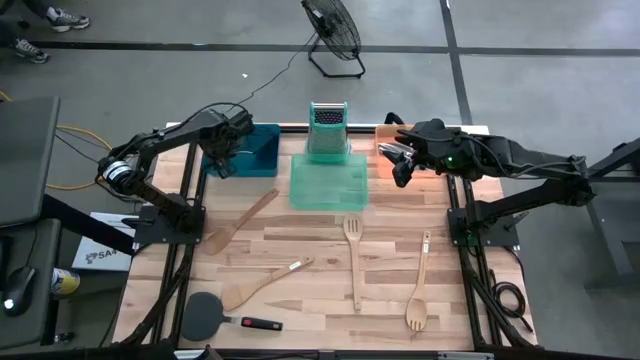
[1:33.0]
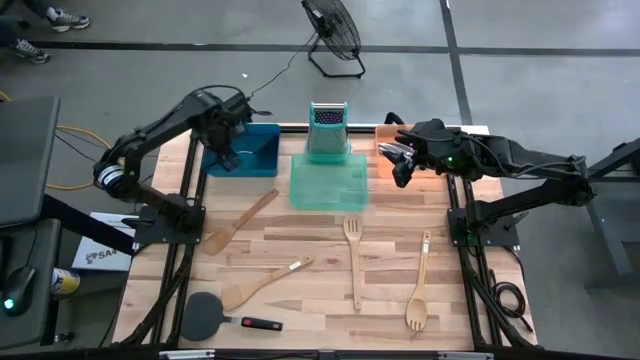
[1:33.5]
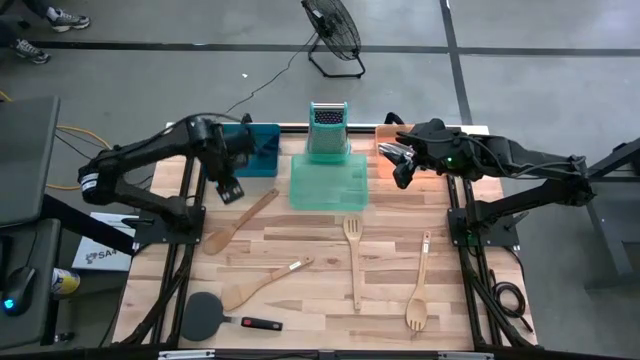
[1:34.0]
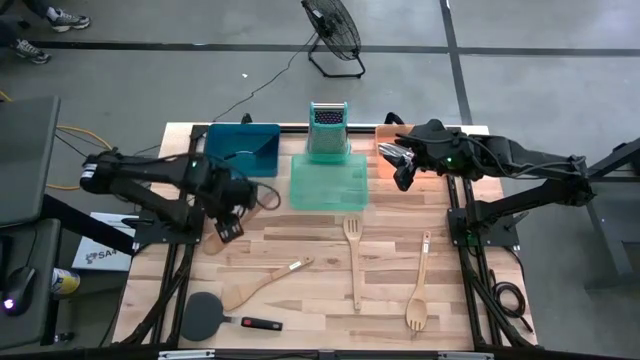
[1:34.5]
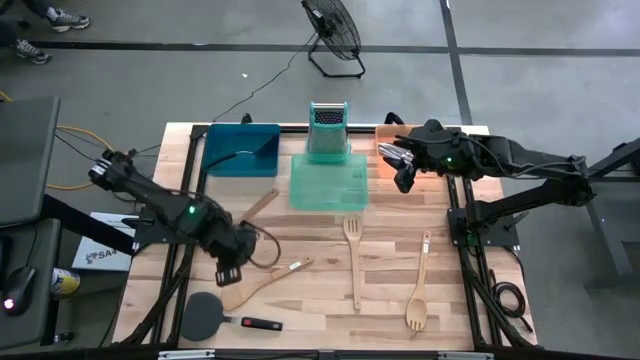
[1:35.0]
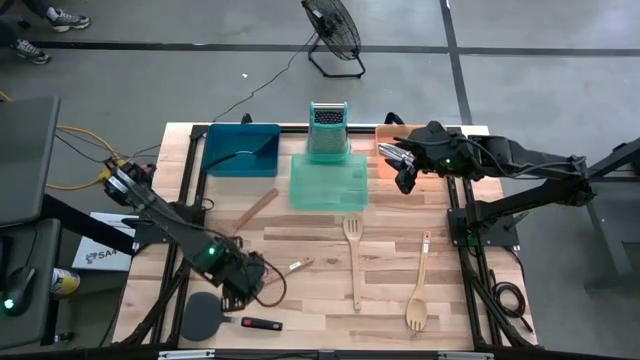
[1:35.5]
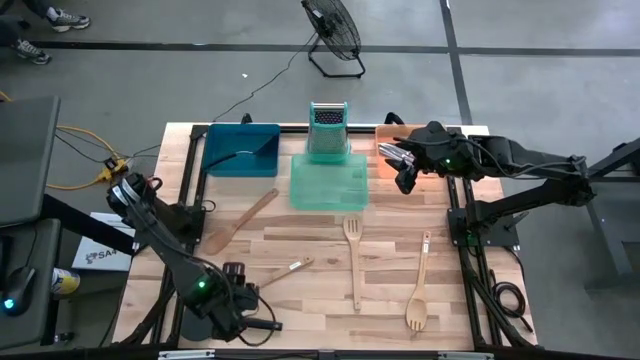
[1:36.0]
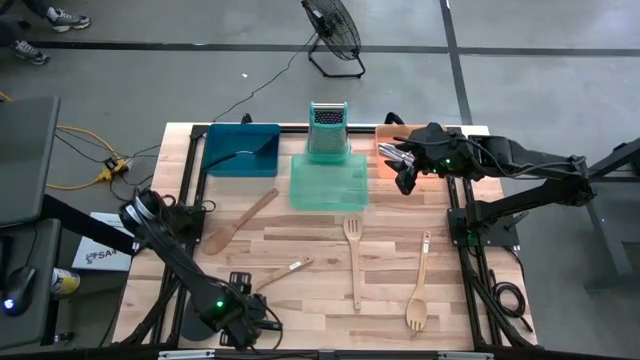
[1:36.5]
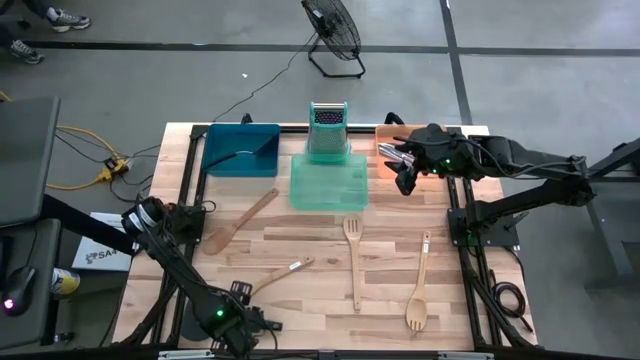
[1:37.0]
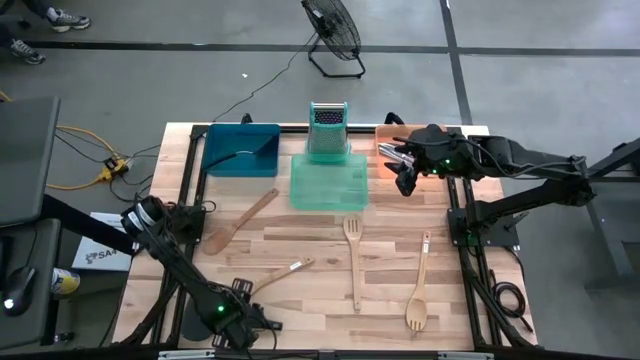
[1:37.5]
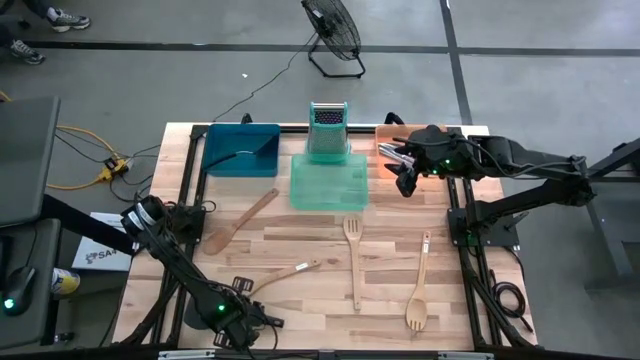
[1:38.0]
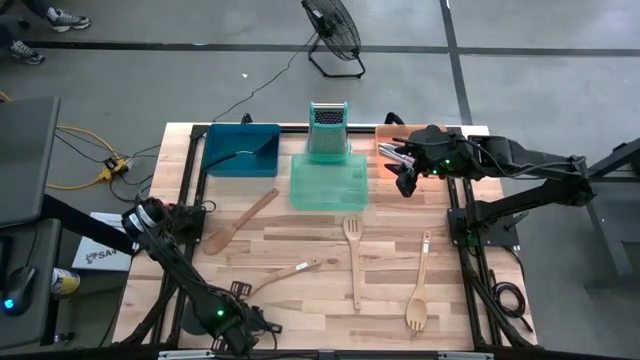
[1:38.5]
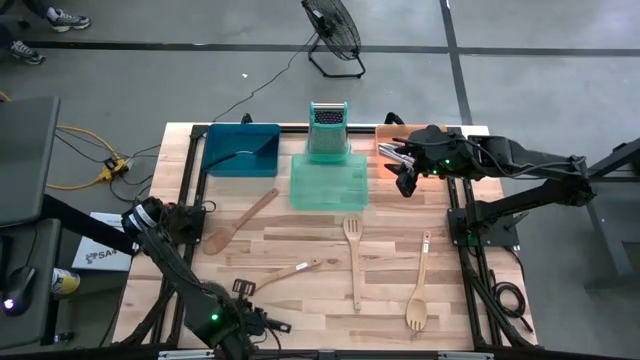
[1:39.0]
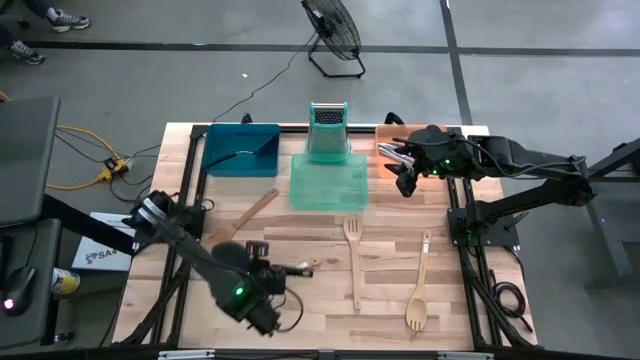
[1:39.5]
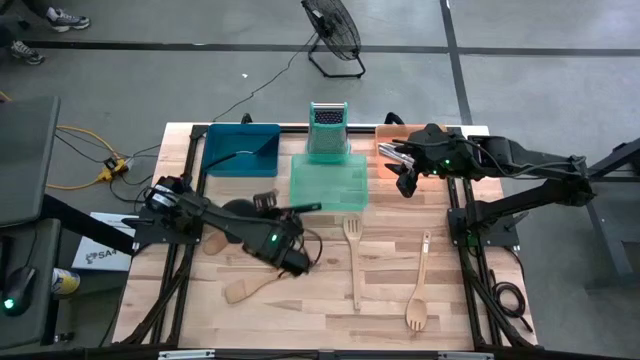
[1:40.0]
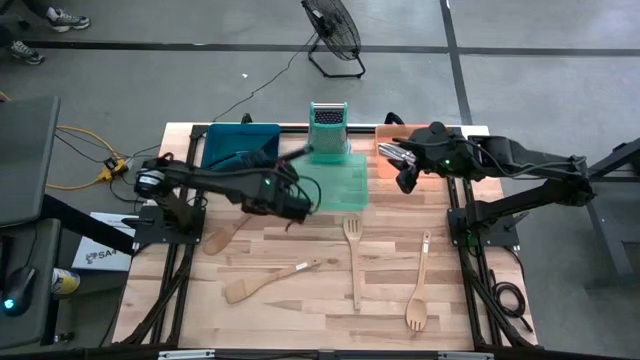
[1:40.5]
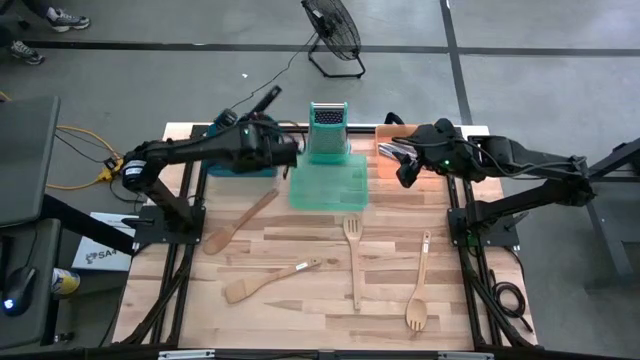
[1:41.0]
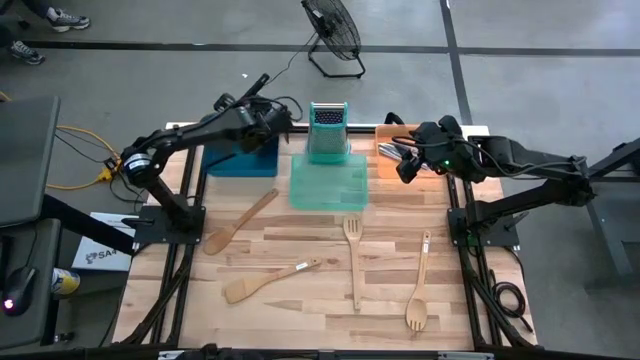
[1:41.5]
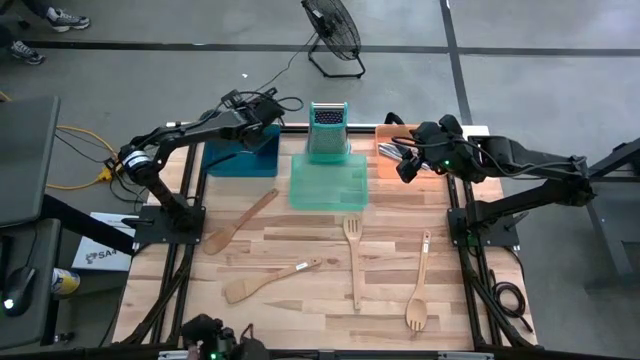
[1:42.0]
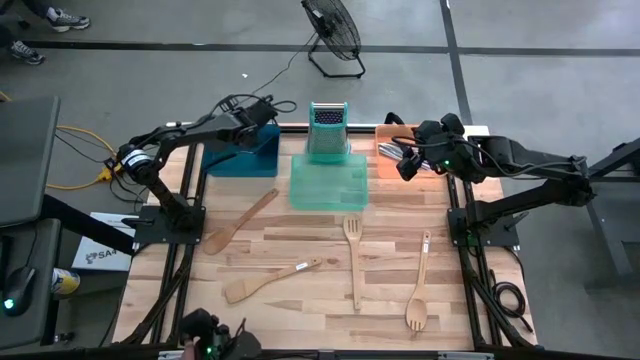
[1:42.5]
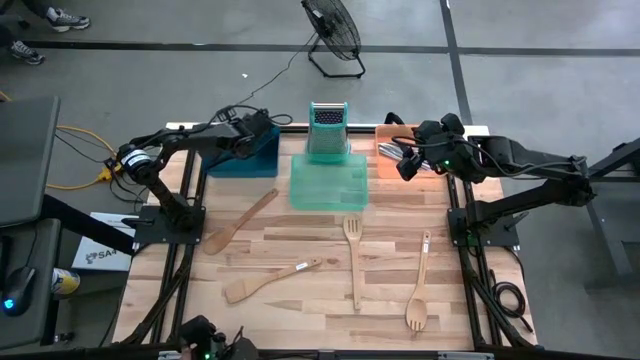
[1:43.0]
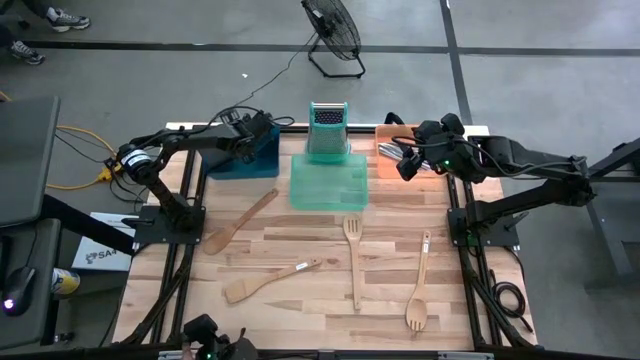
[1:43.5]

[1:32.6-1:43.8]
Task: Pick & Place Kitchen Items
Put the black spatula into the blue bin

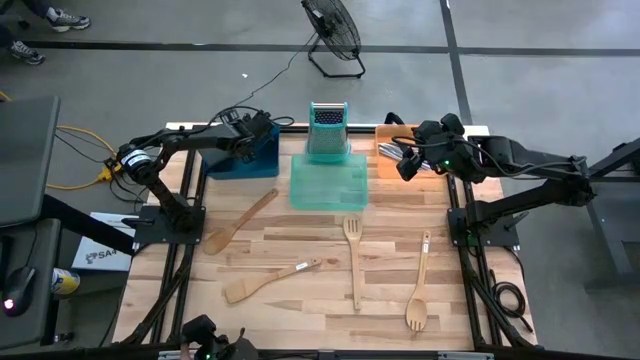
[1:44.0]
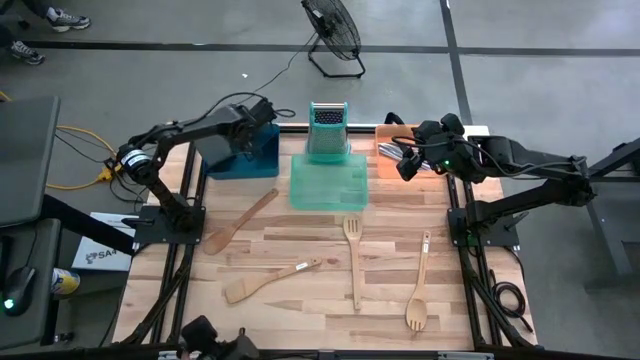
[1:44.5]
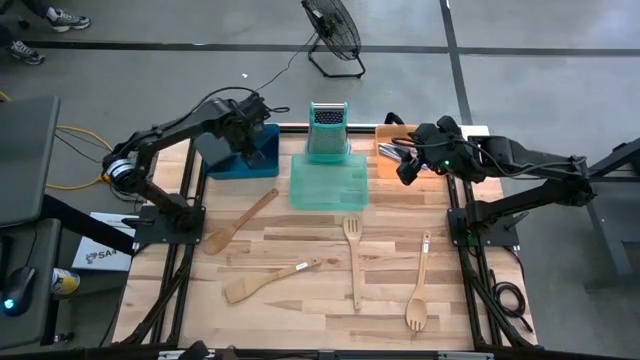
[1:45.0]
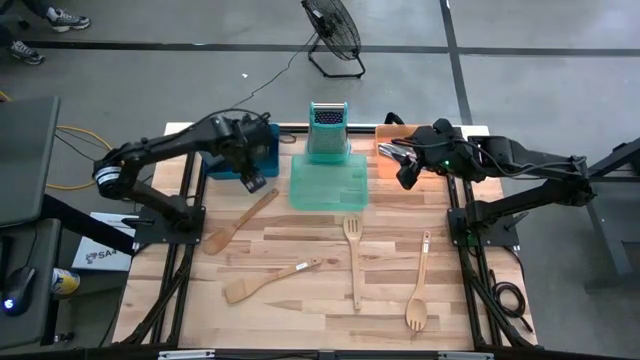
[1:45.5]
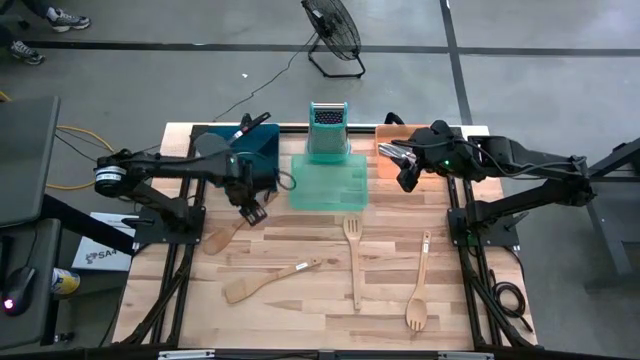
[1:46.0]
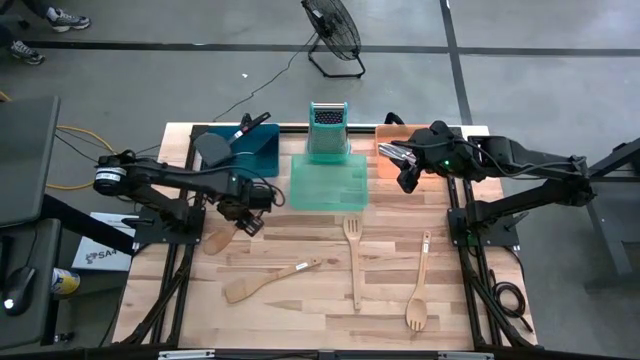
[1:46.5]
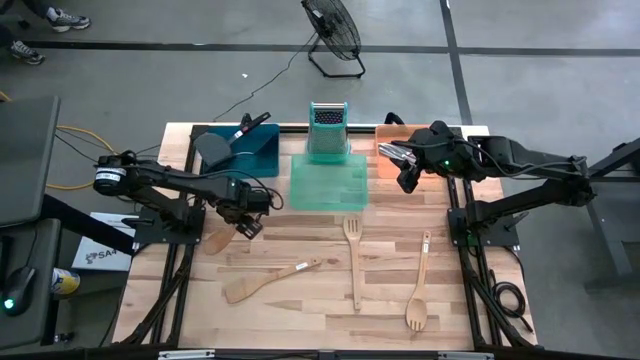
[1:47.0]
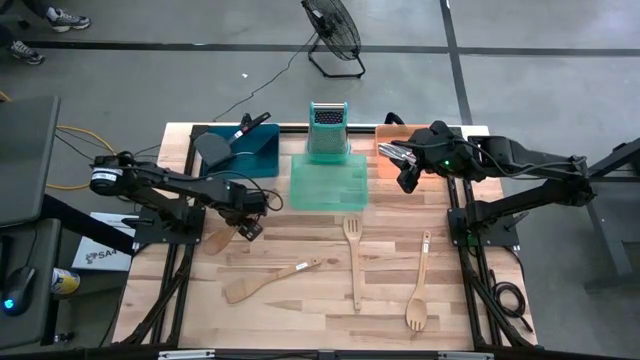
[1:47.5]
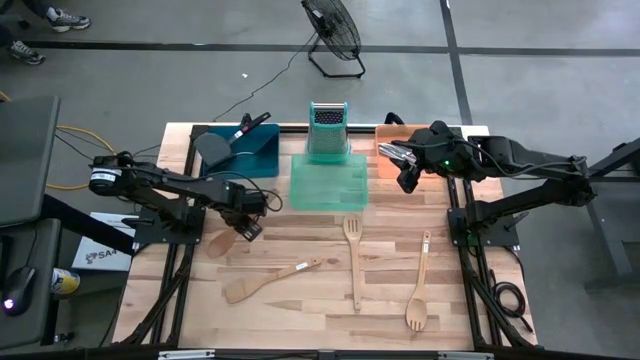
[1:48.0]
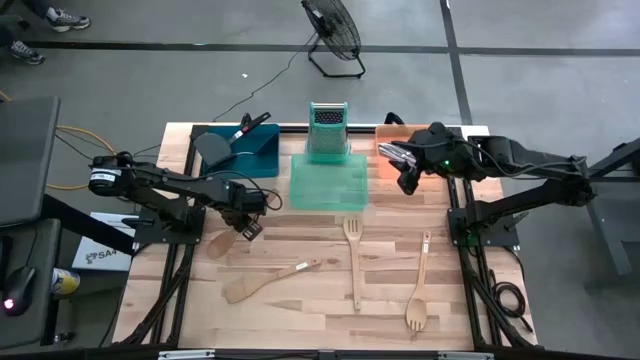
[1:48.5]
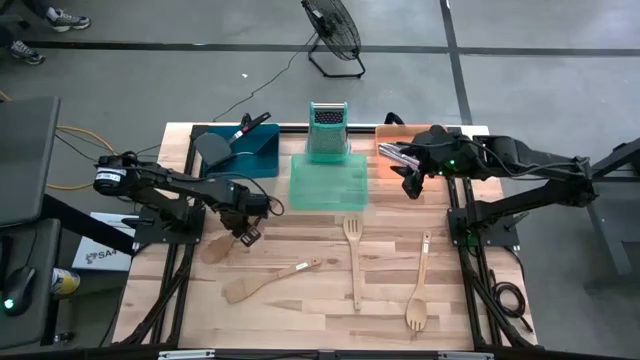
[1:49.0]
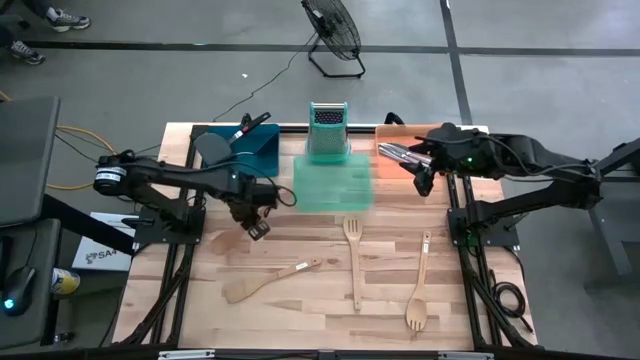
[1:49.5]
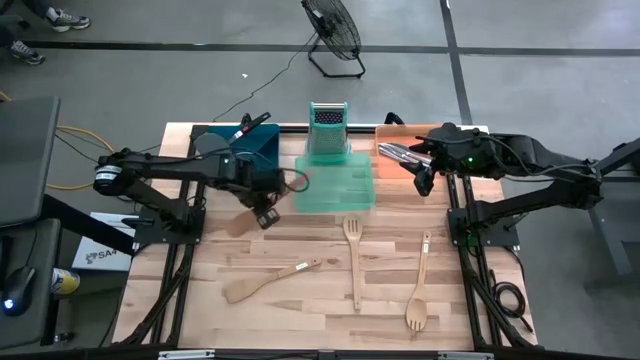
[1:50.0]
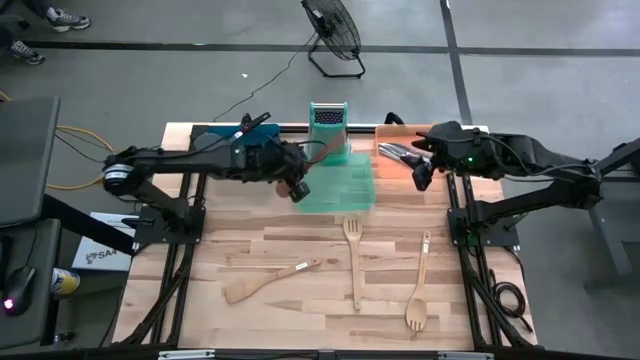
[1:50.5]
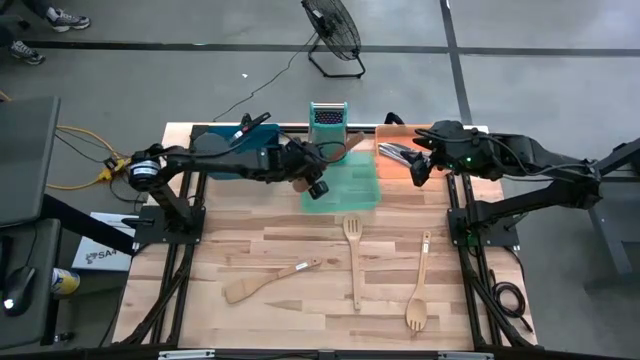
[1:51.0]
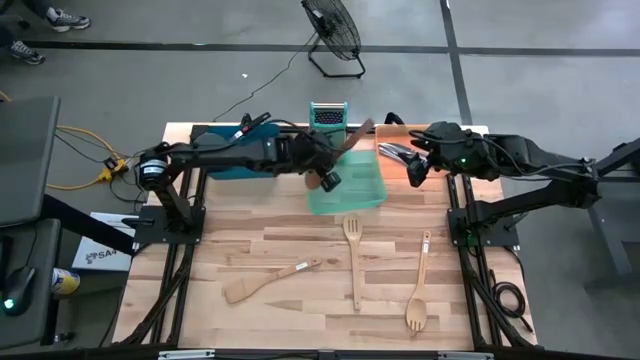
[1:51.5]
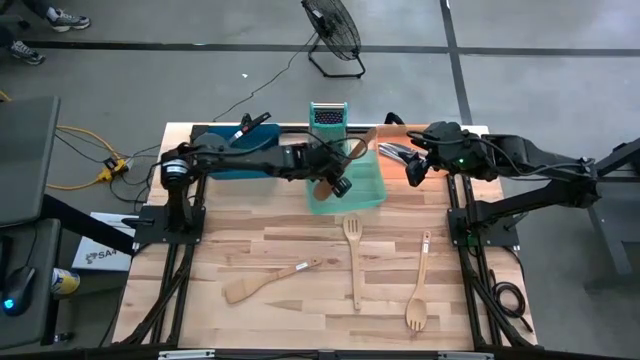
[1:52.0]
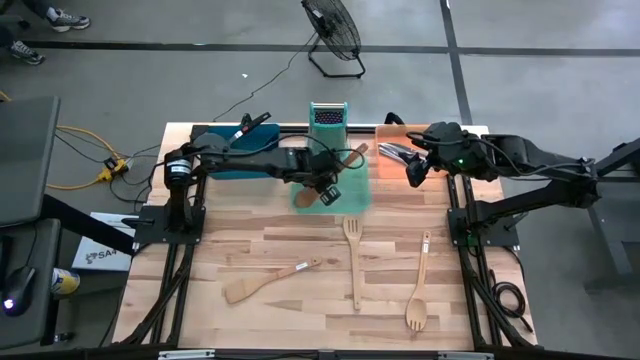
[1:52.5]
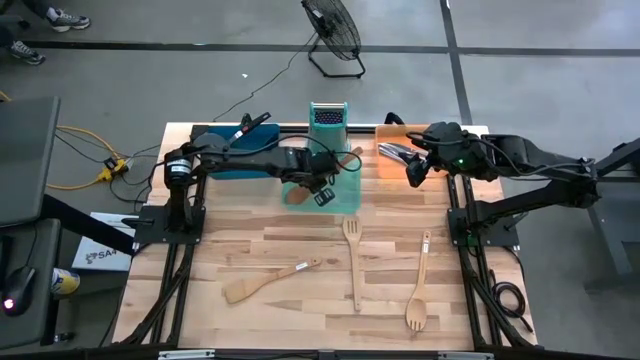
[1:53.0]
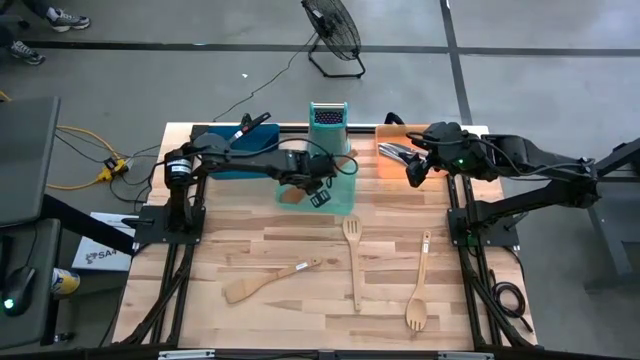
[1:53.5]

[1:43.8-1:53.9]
Put the wooden spoon into the green bin

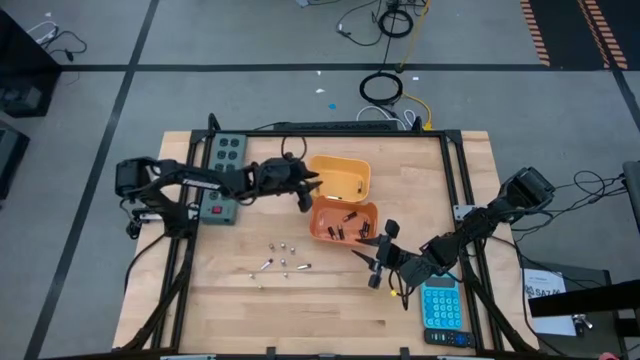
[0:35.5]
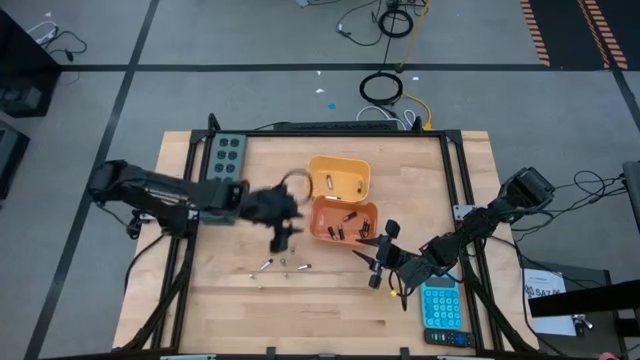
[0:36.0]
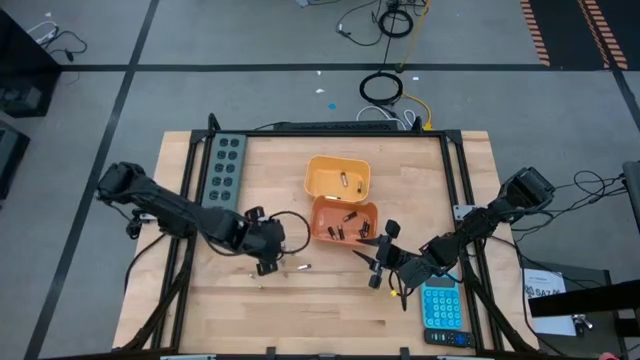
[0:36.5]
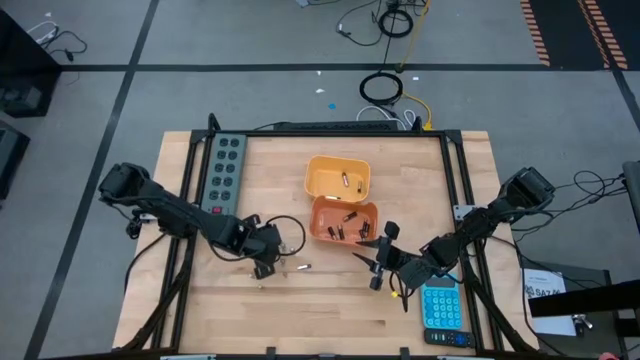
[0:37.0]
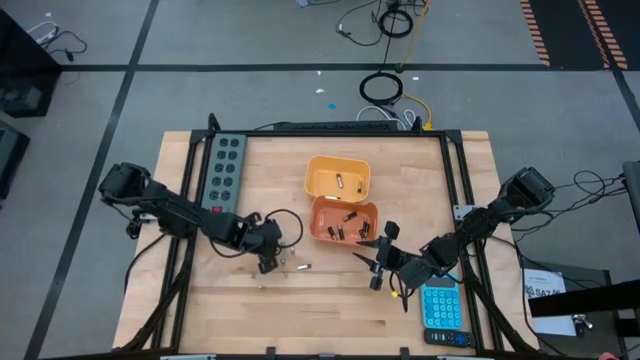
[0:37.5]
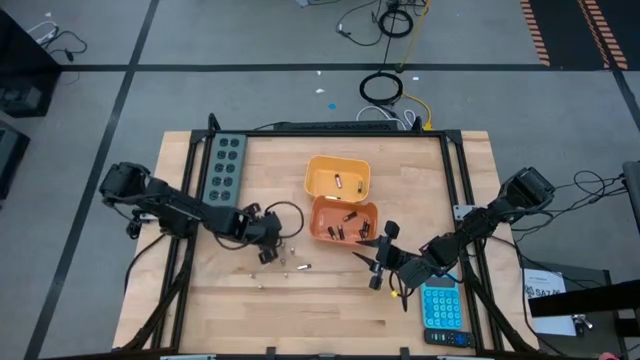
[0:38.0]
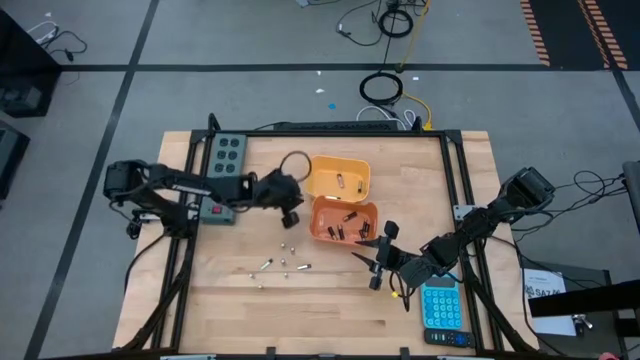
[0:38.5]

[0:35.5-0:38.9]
Task: Sort batteries
Put the silver battery into the yellow bin
